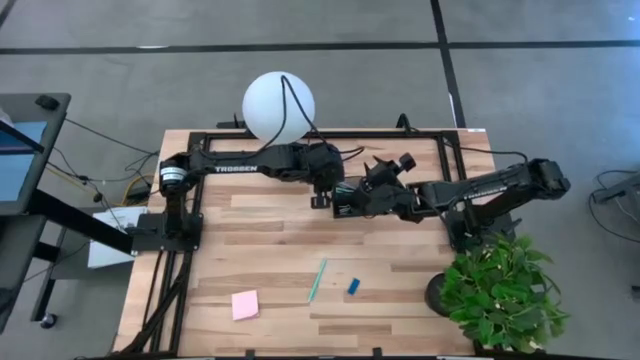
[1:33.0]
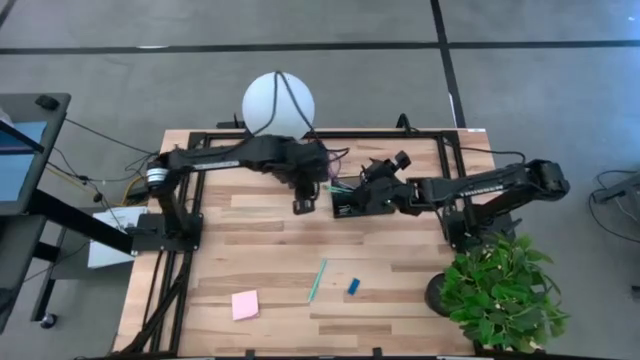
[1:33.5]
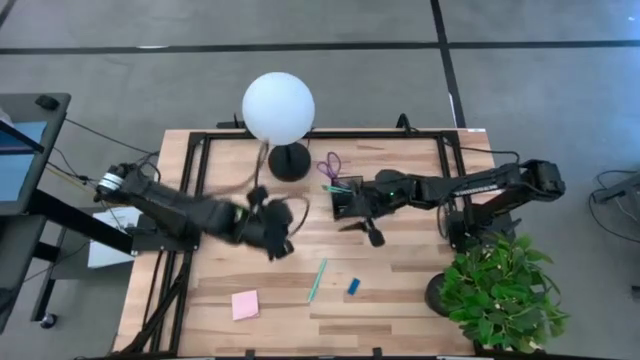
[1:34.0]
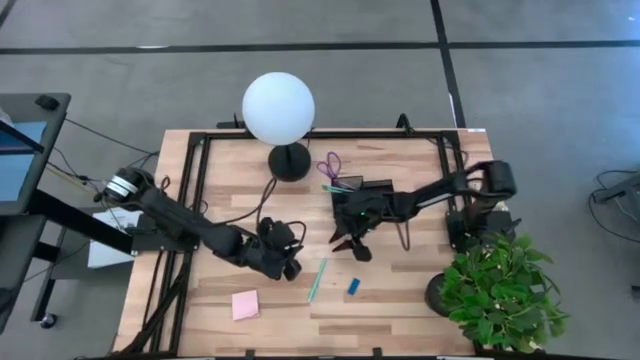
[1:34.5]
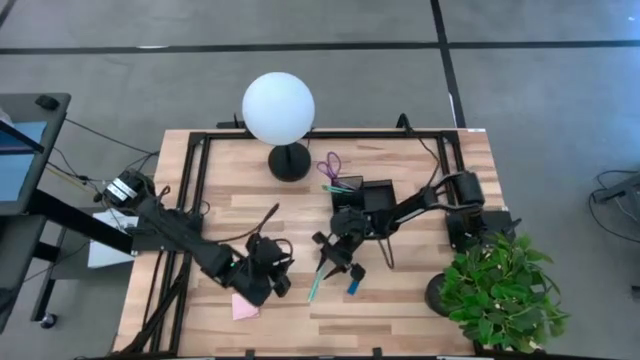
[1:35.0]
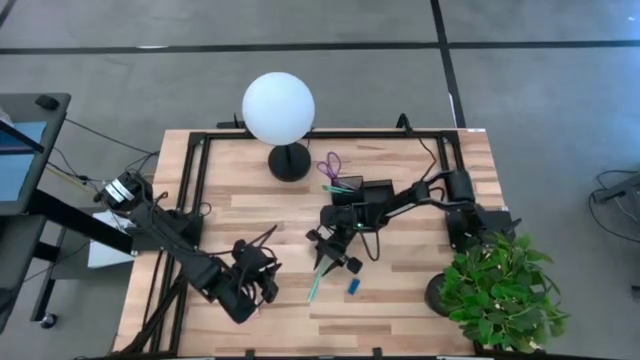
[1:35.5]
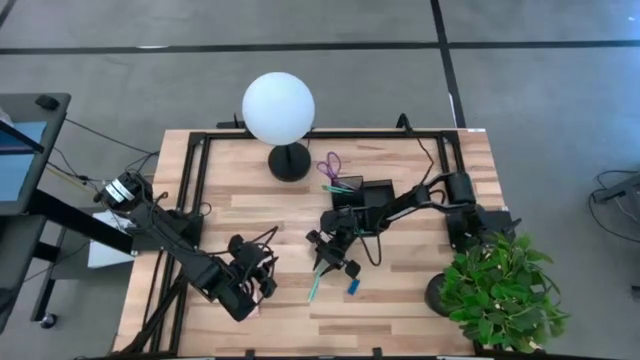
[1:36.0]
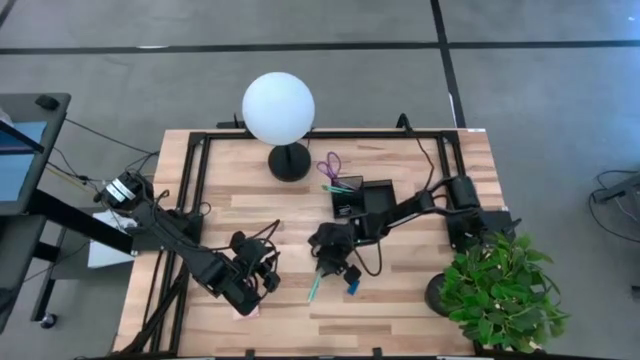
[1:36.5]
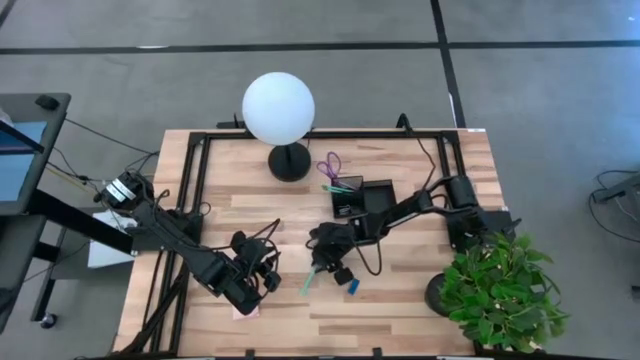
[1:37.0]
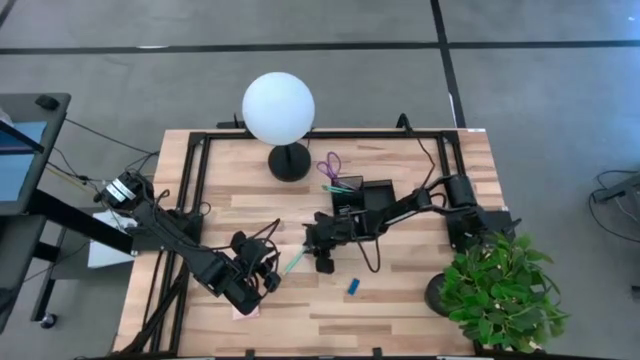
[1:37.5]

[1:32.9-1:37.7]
Task: Pick and place office supplies into organizer
Put the light blue pen into the black desk organizer

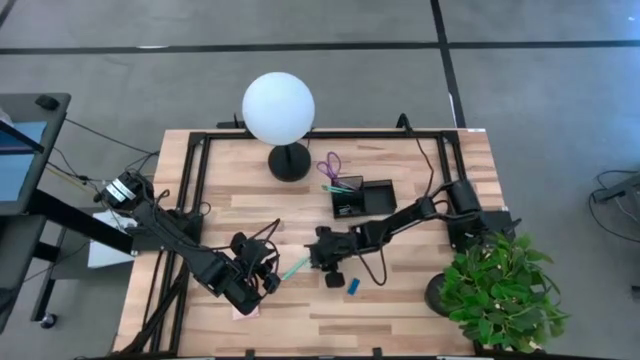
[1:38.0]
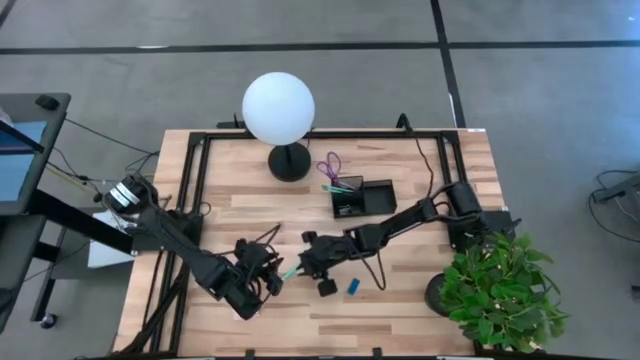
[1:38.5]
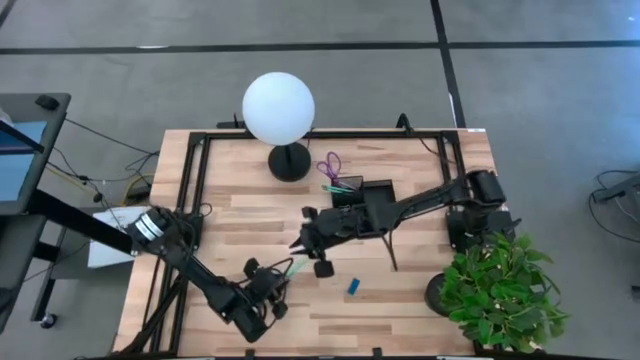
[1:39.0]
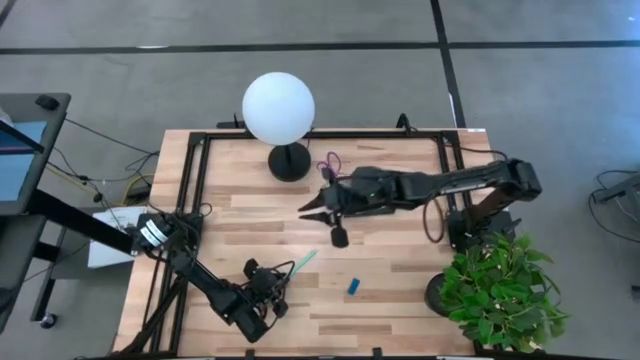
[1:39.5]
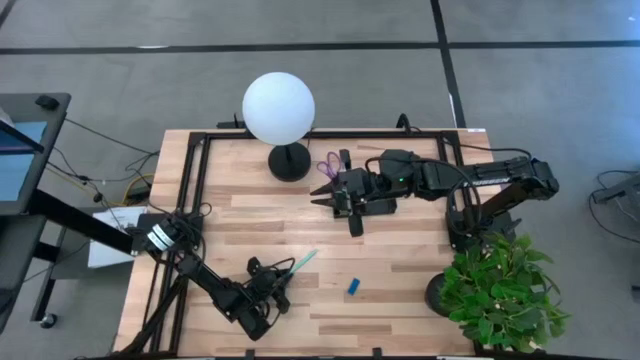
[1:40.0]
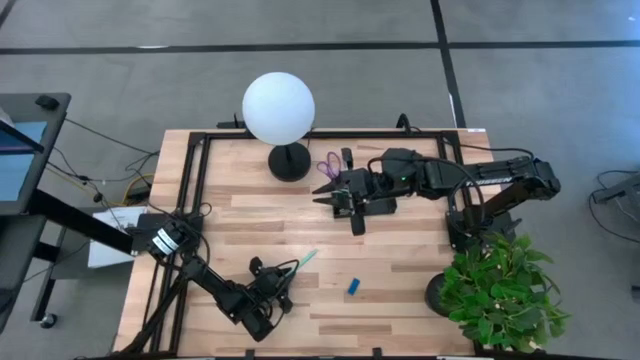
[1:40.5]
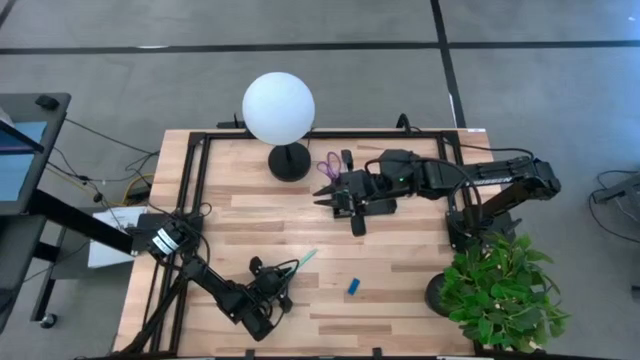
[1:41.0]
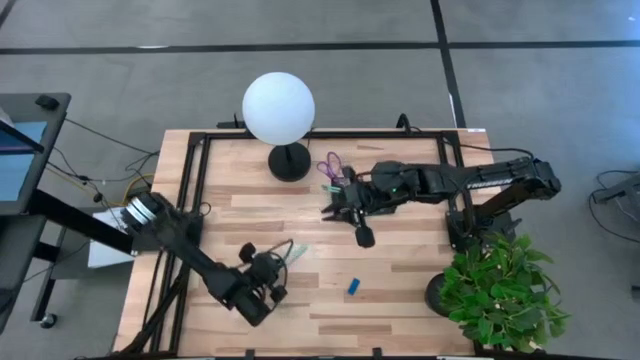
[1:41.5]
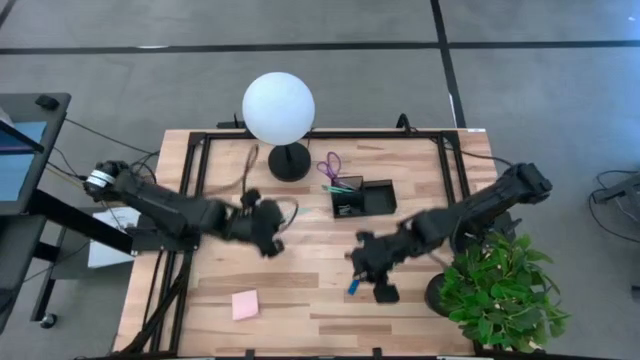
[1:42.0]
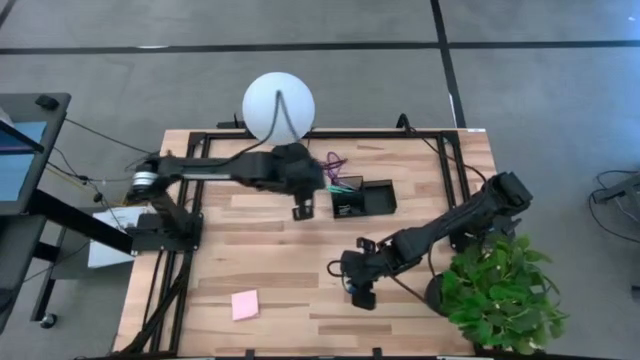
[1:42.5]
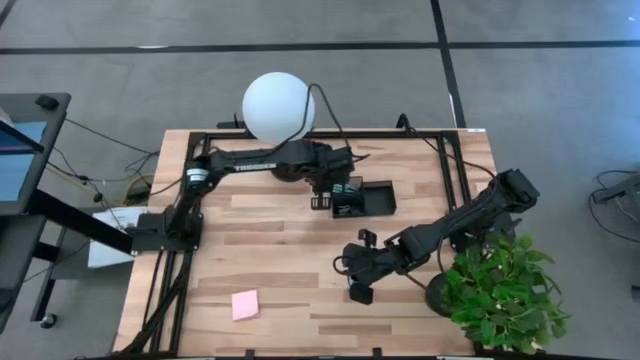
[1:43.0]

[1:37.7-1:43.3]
Put the light blue pen into the black desk organizer

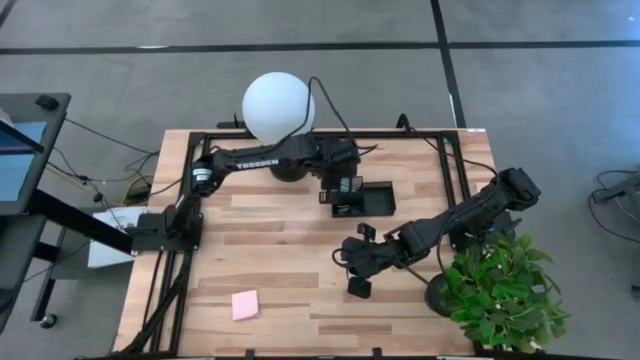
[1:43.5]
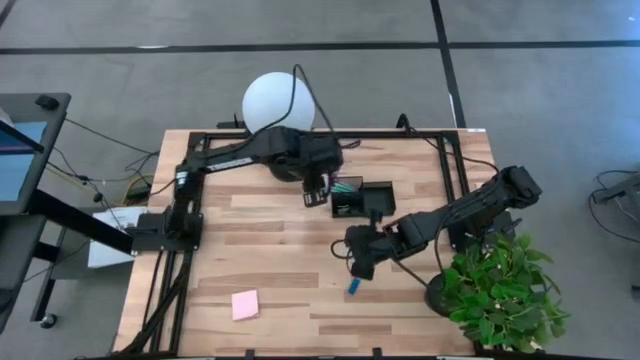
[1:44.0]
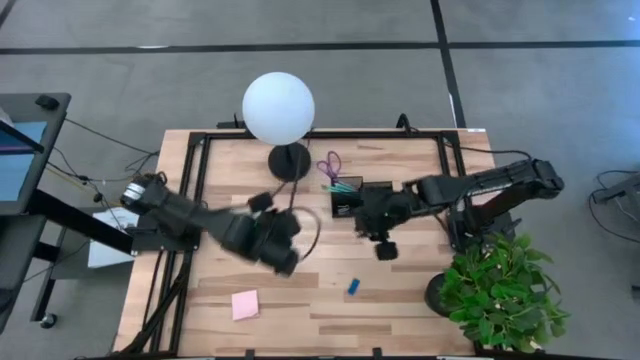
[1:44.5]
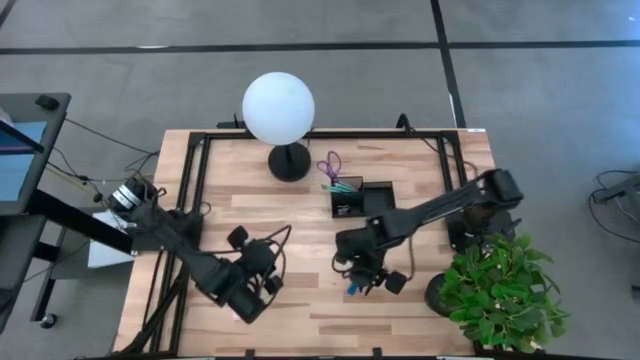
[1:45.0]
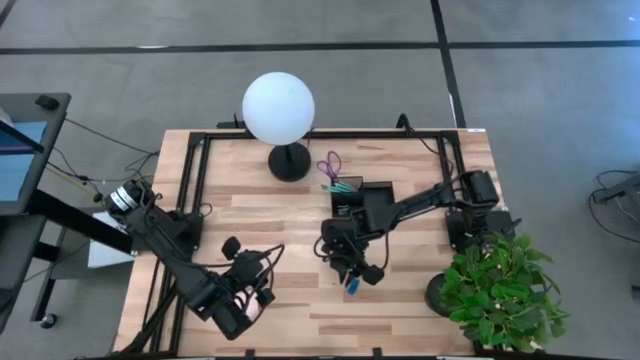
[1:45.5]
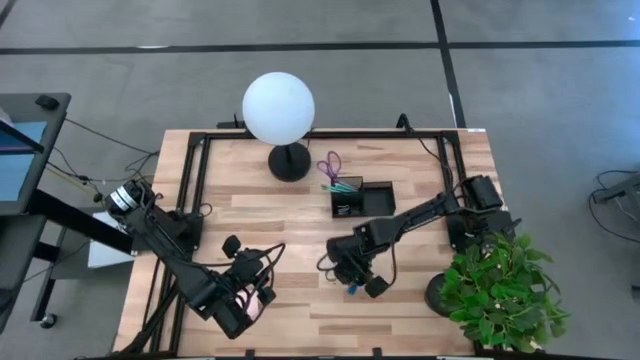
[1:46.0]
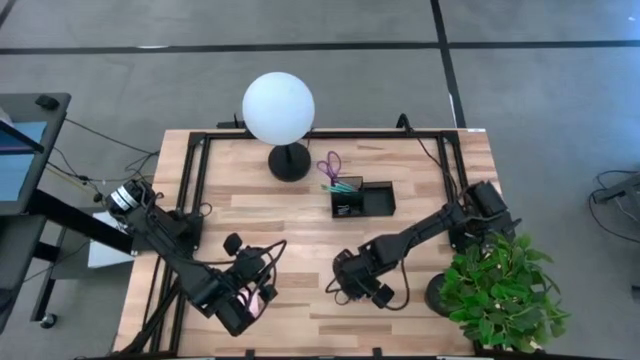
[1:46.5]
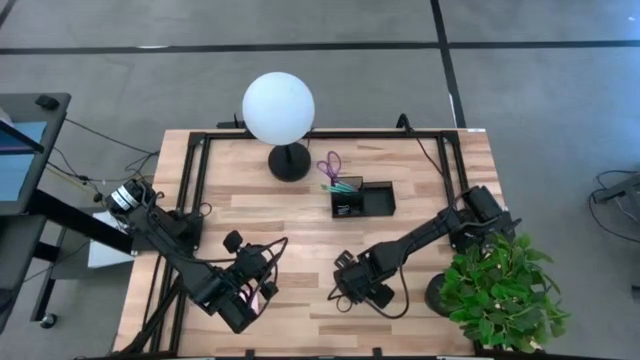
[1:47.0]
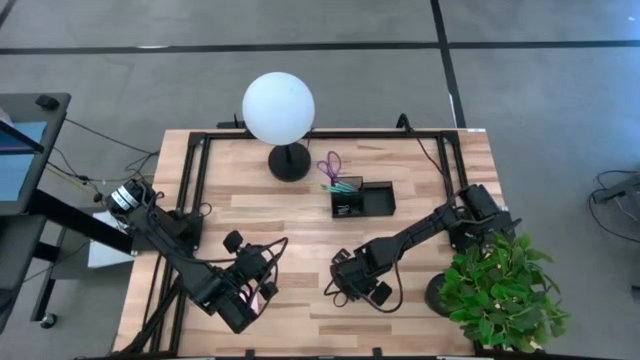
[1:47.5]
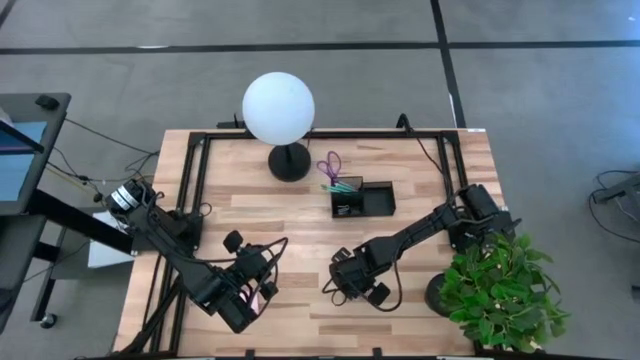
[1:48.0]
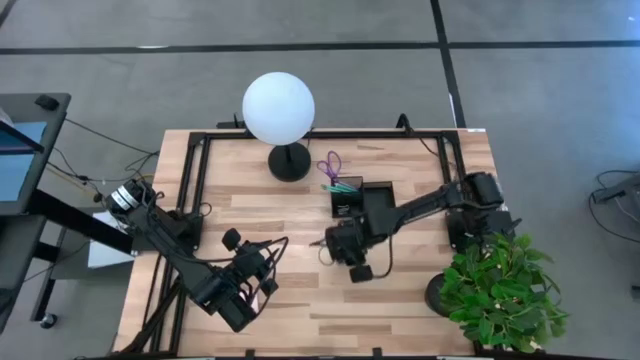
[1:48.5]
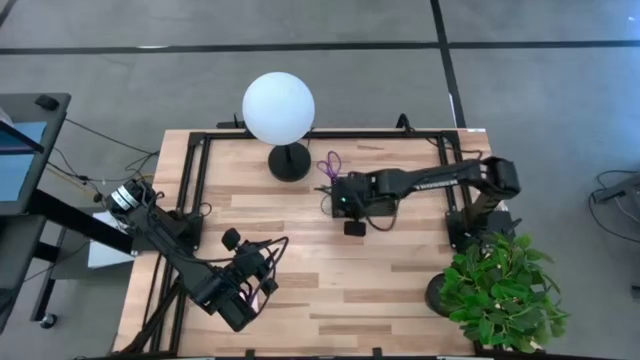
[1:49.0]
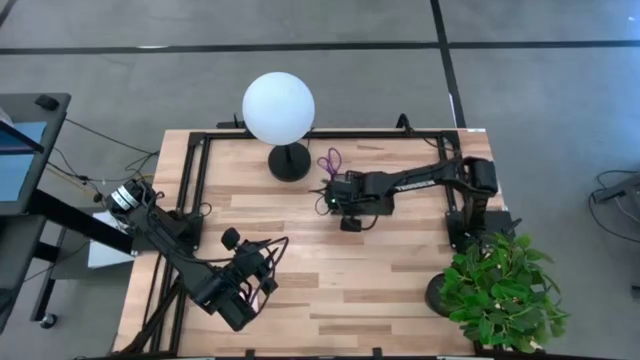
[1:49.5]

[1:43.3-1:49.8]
Put the blue eraser into the black desk organizer

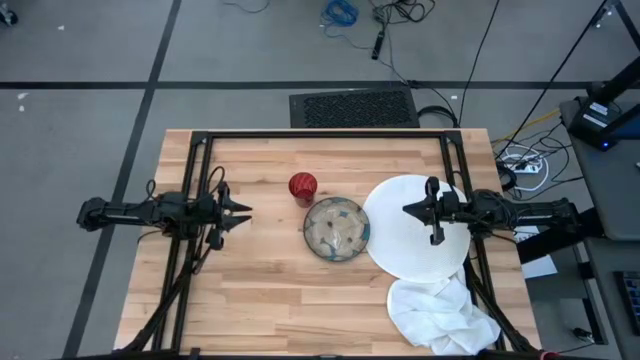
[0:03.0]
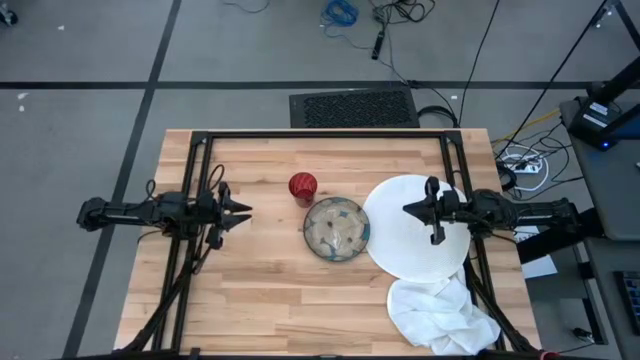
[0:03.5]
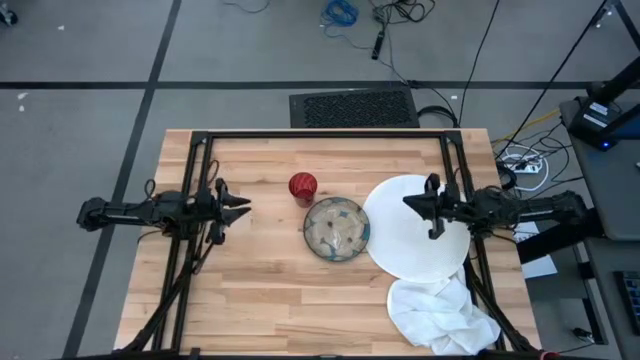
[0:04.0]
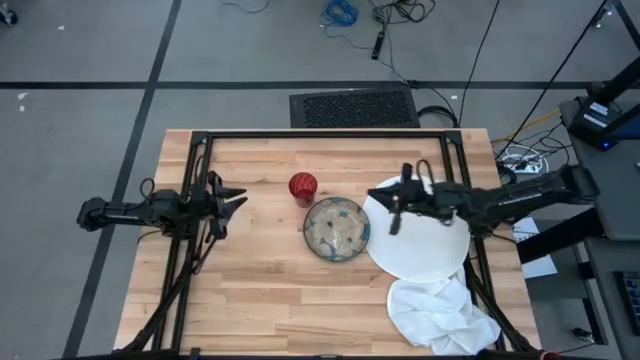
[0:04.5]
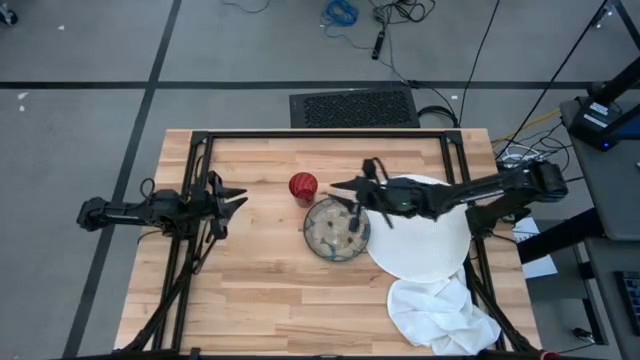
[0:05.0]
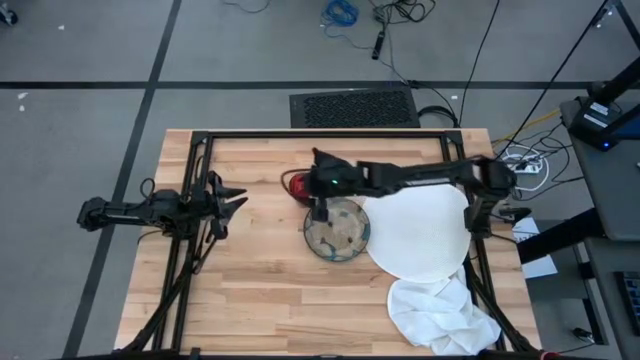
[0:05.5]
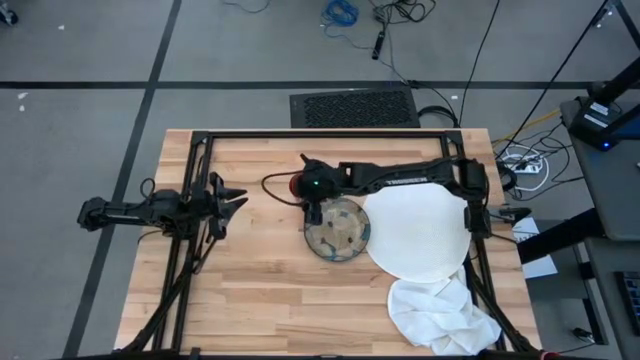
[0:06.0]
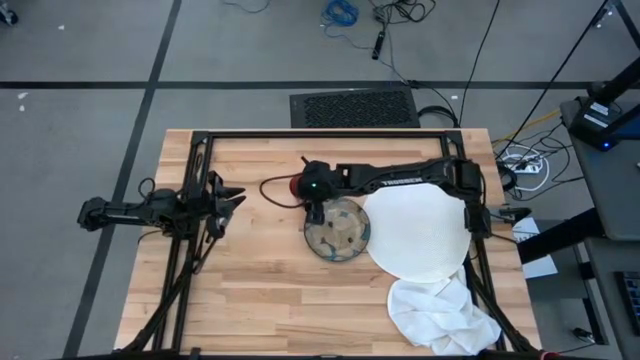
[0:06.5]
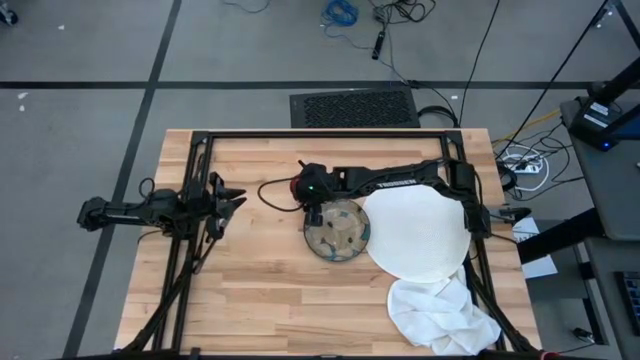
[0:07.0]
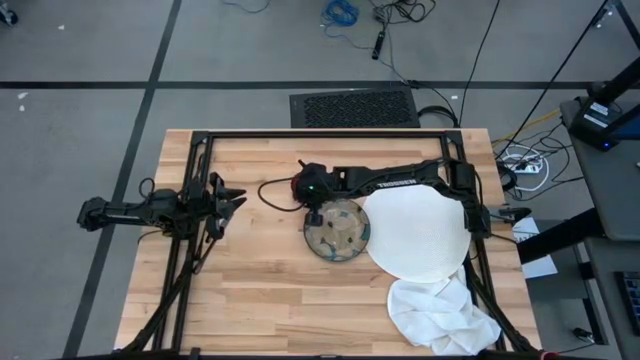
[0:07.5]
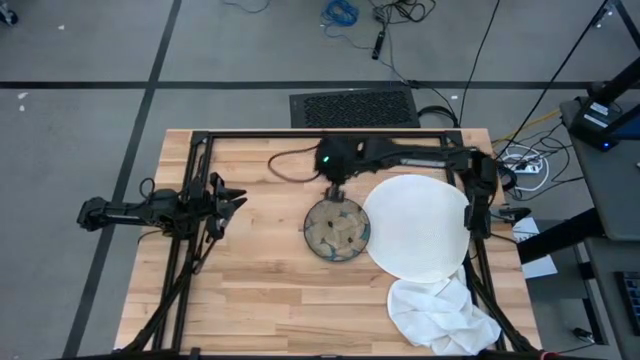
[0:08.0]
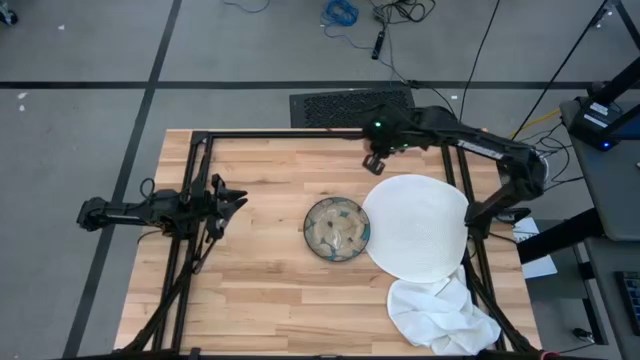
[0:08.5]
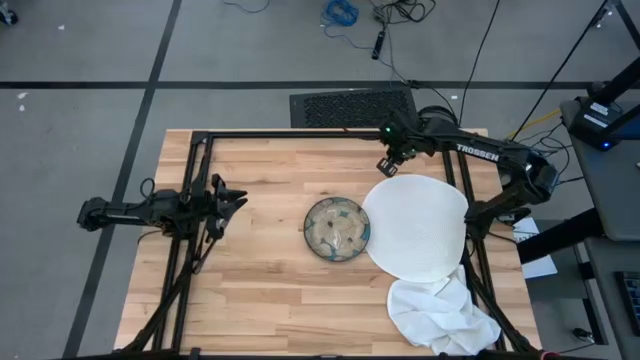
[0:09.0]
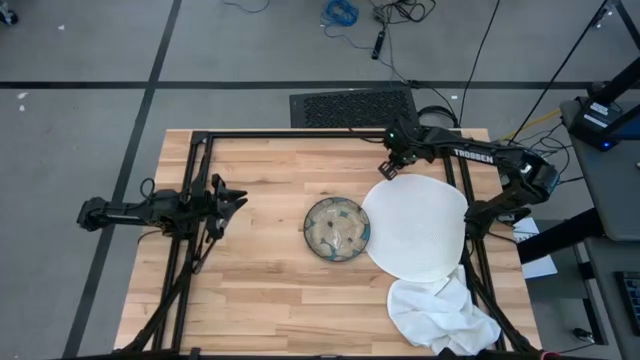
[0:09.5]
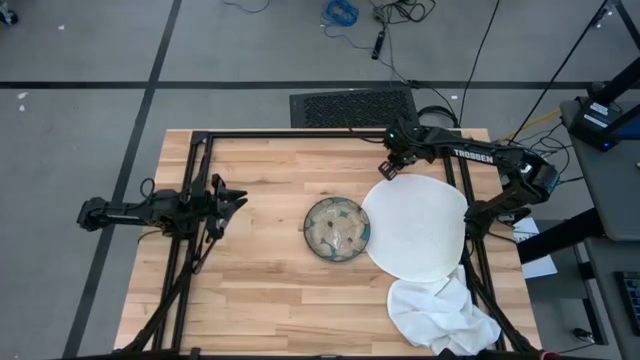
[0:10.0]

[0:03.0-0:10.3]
Task: Set table place
Put the red glass to the top right of the table
